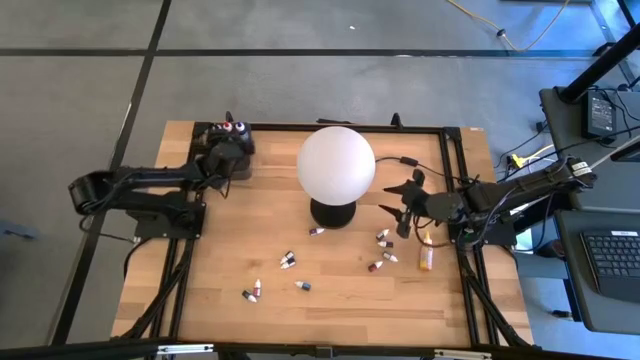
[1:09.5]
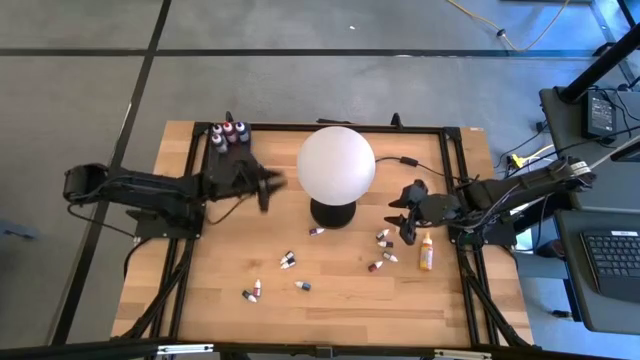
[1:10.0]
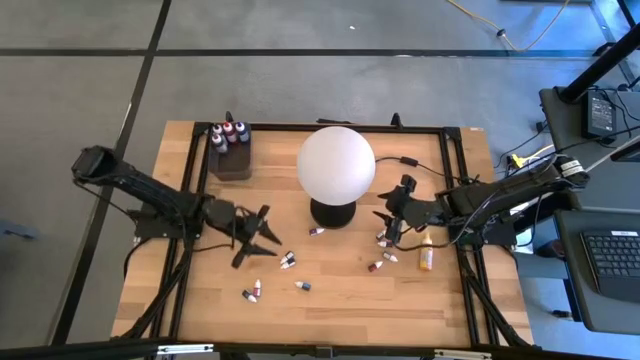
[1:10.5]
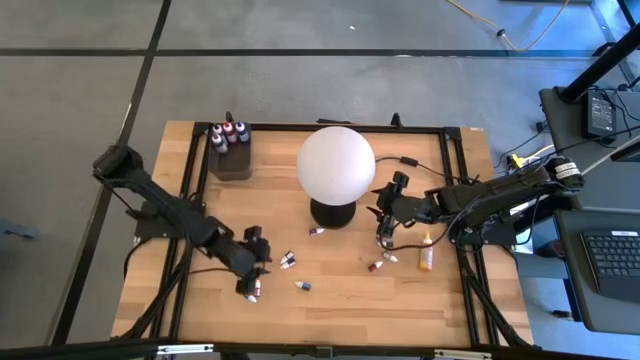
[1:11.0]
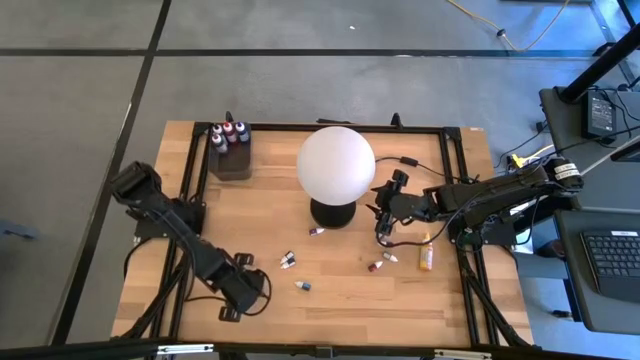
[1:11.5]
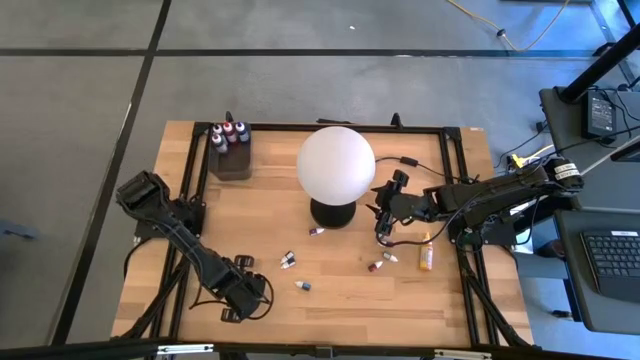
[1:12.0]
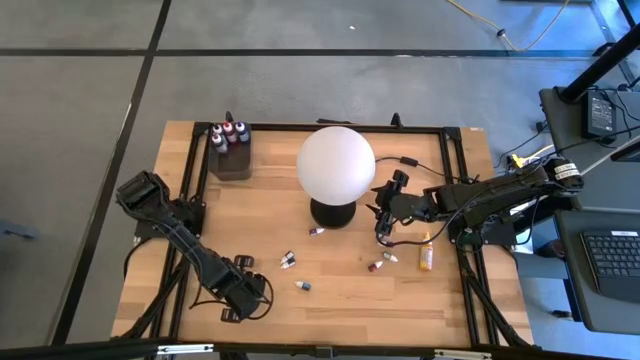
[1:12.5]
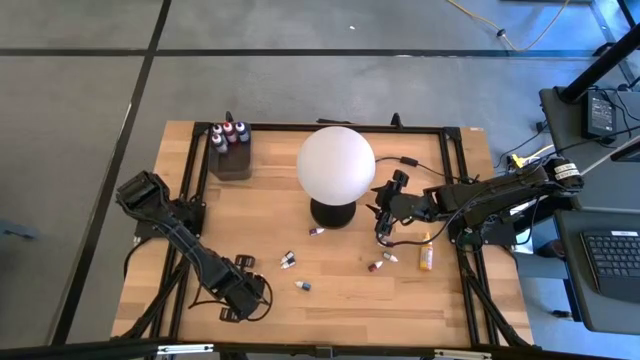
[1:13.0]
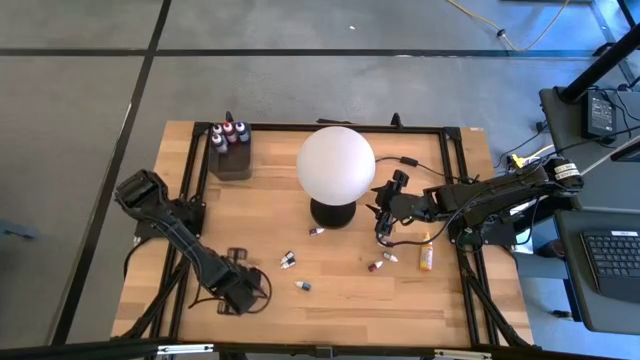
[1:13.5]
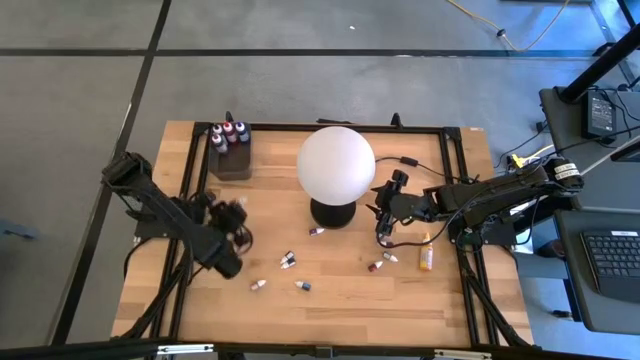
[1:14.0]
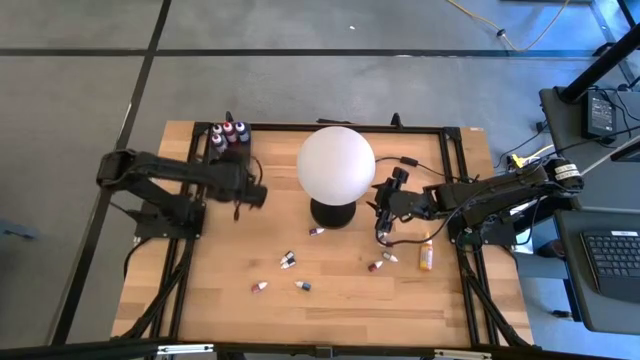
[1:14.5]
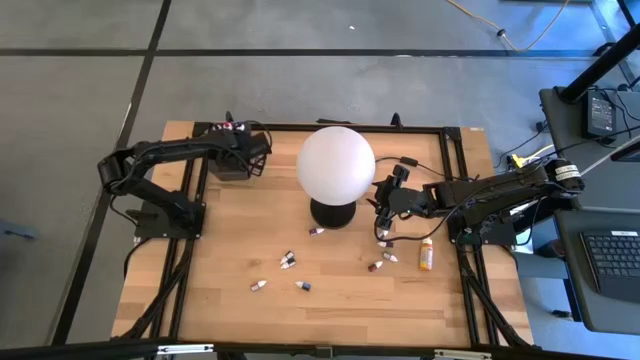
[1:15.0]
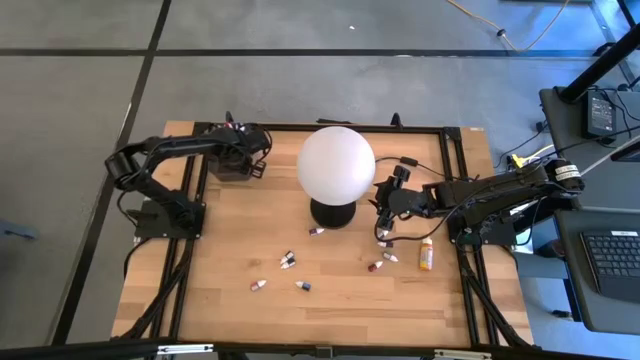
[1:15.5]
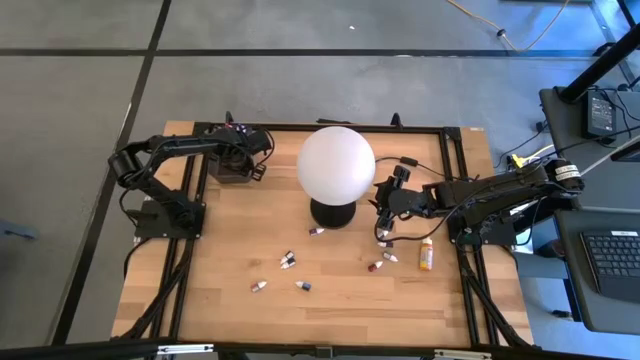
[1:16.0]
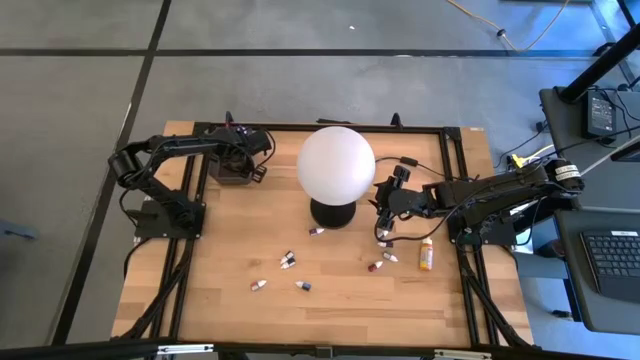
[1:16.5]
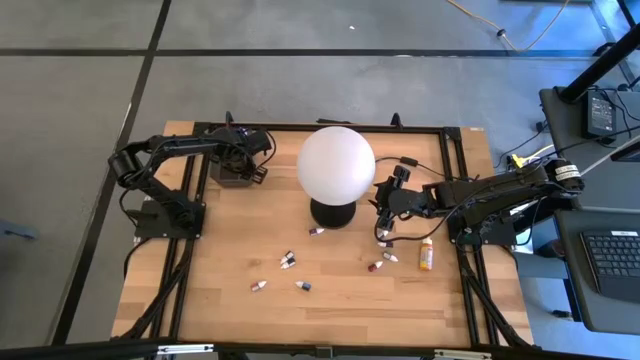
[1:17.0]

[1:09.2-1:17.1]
Task: Pick & Place food coloring
Put the left small blue food coloring bottle into the black container

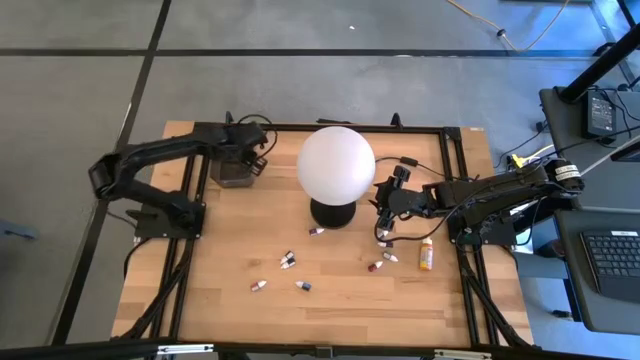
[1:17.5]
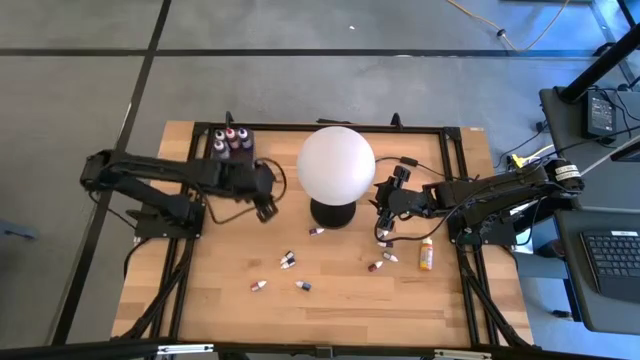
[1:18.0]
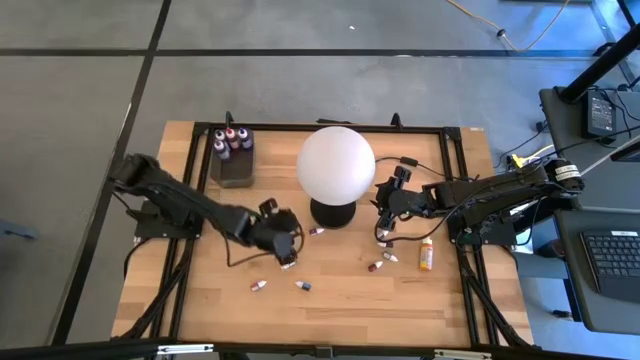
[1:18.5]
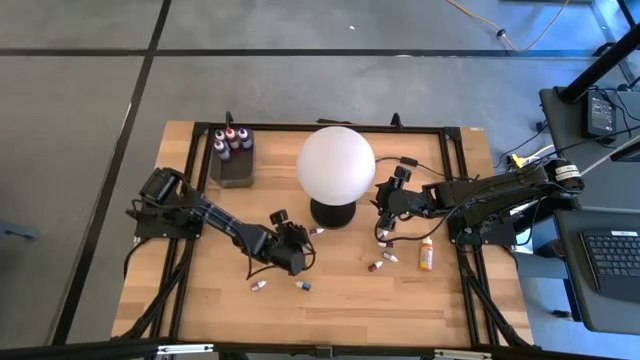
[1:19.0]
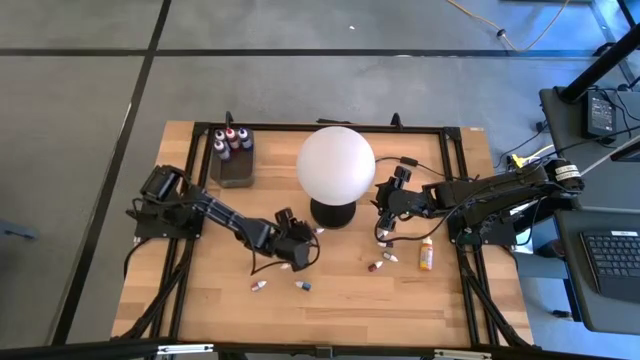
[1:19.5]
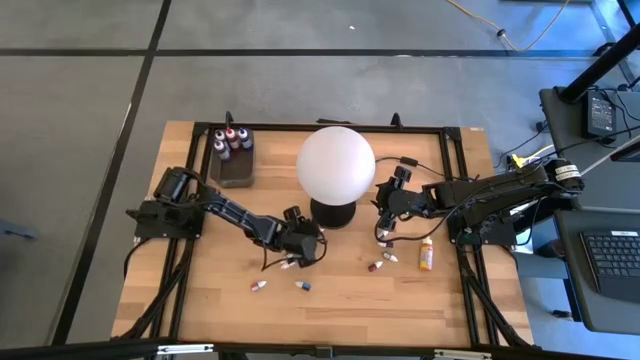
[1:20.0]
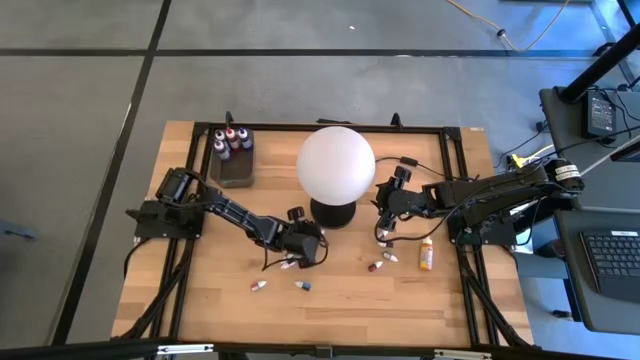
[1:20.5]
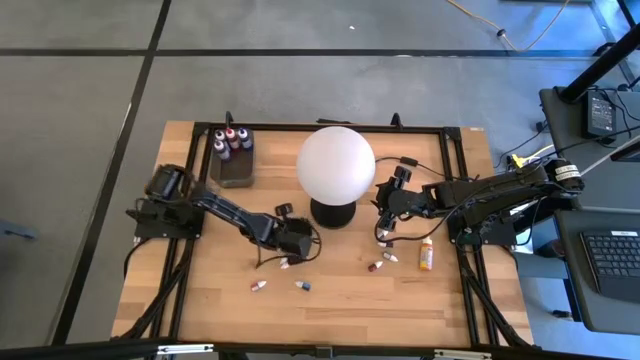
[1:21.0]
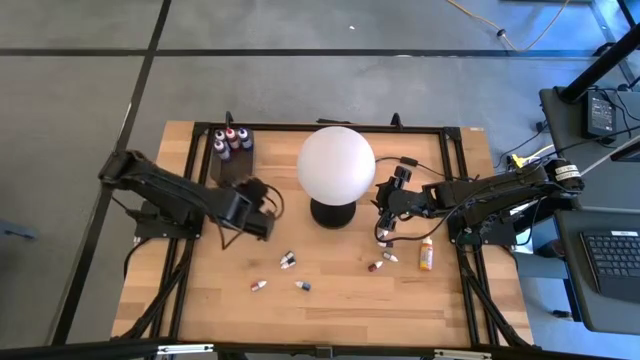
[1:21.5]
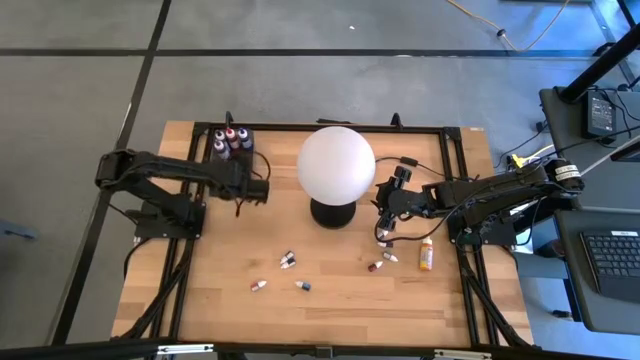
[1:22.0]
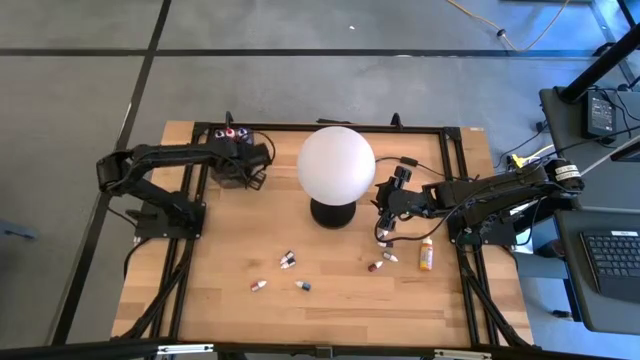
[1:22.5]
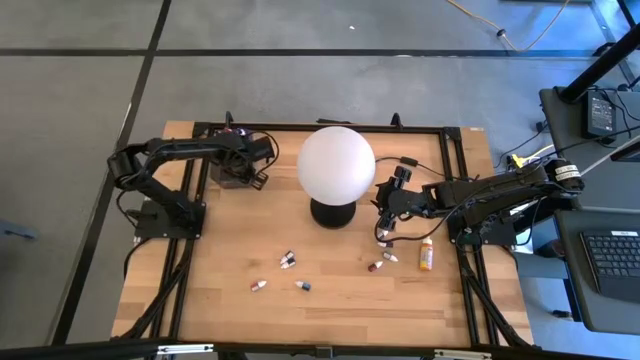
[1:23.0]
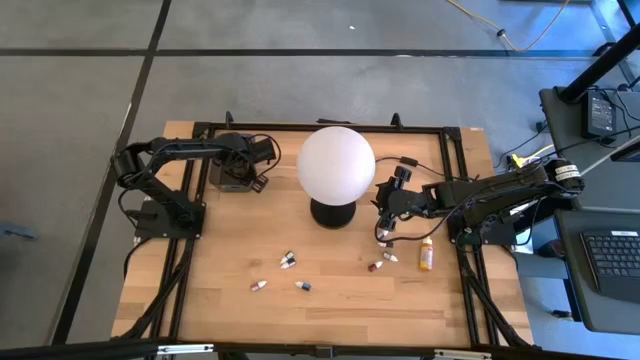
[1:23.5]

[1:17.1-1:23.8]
Put the small purple food coloring bottle into the black container

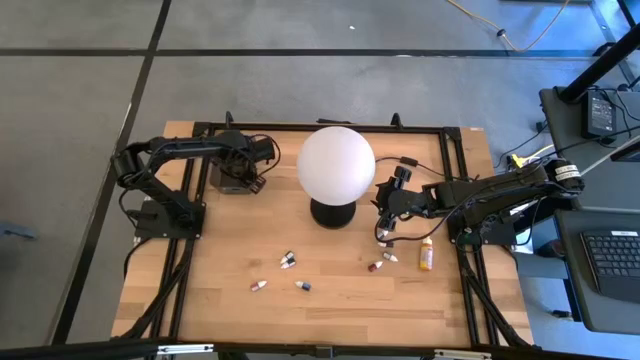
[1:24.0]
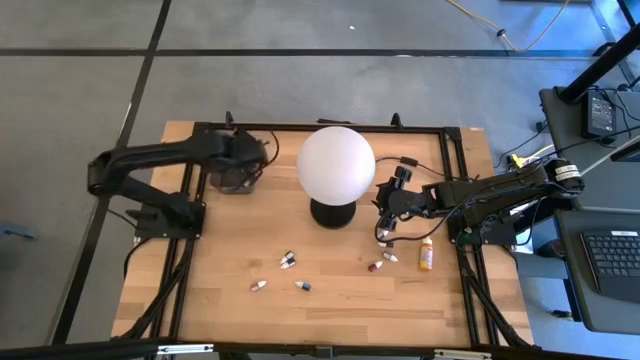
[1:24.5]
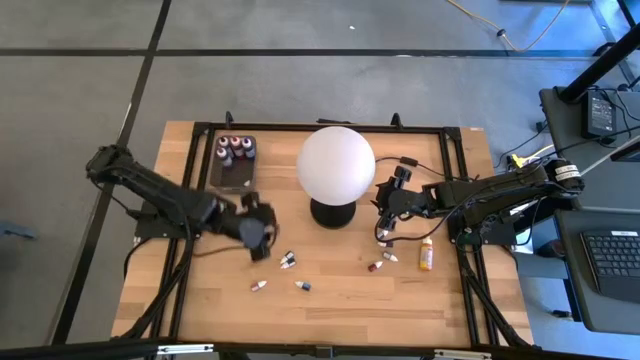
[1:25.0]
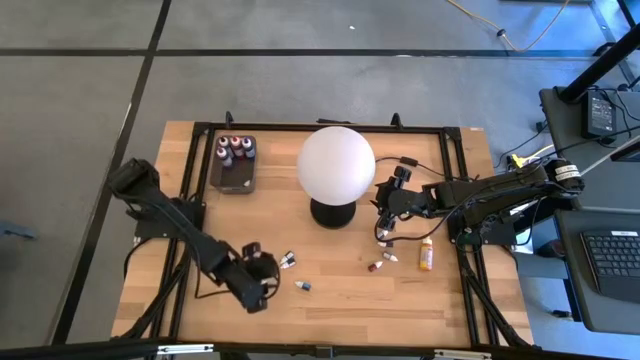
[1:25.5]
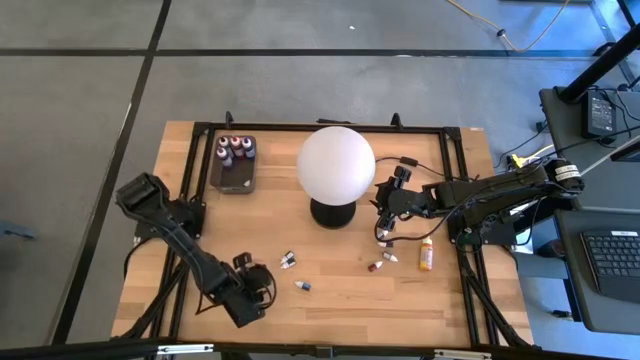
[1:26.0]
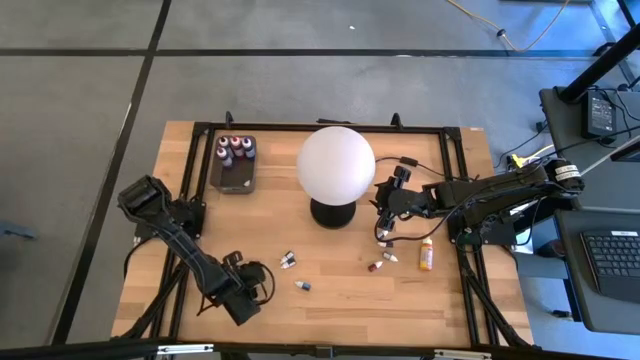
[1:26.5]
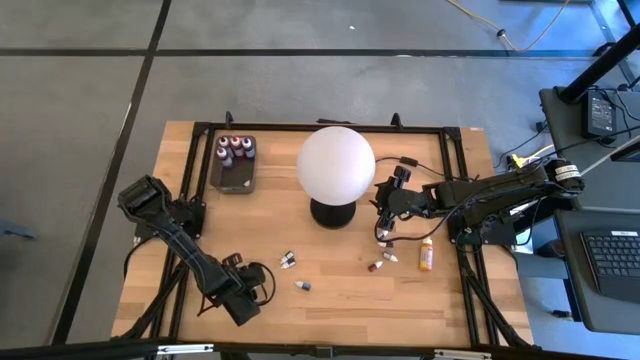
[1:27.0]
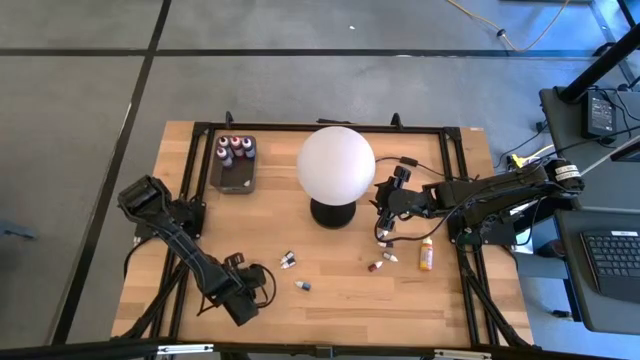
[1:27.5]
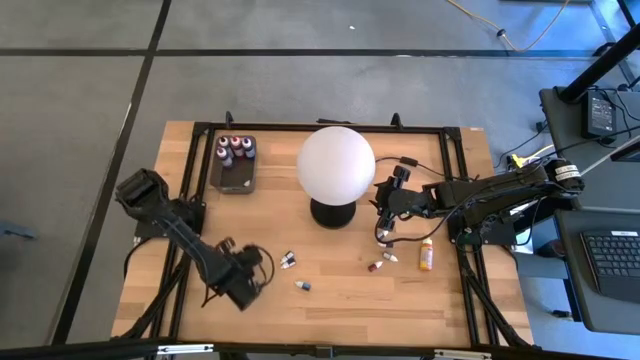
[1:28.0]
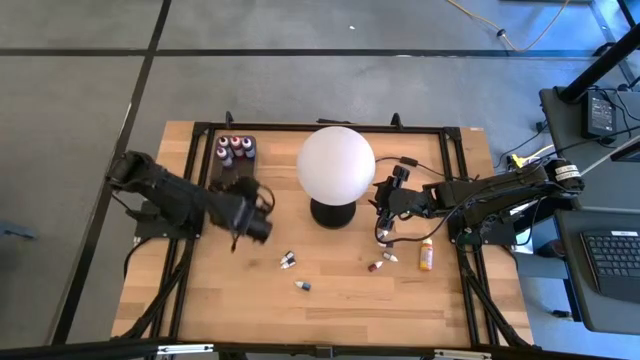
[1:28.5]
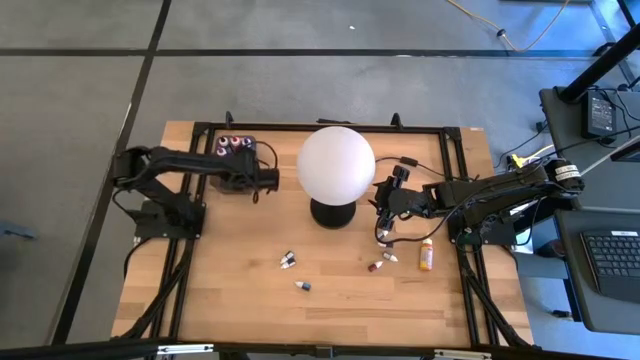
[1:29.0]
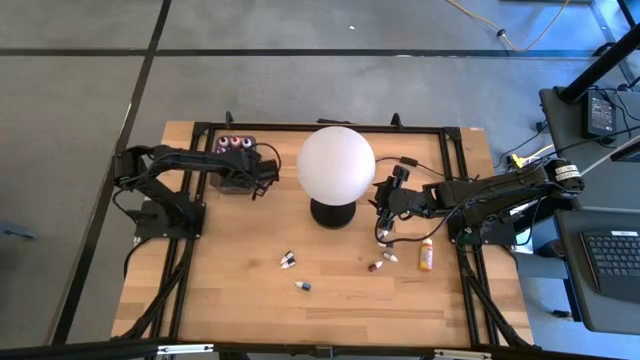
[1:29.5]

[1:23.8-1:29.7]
Put the left small pink food coloring bottle into the black container

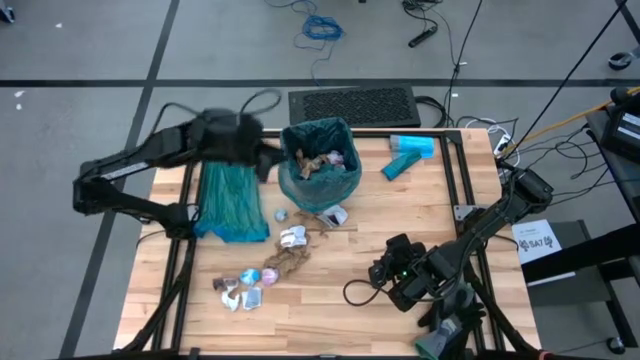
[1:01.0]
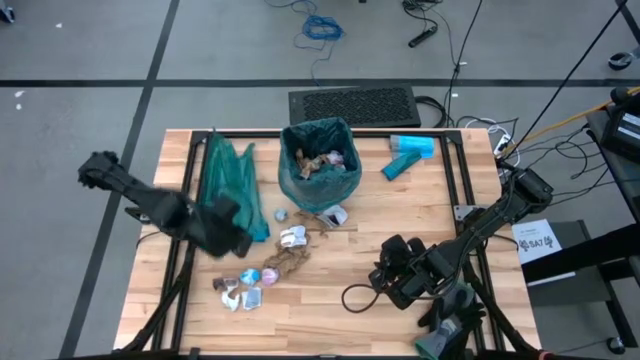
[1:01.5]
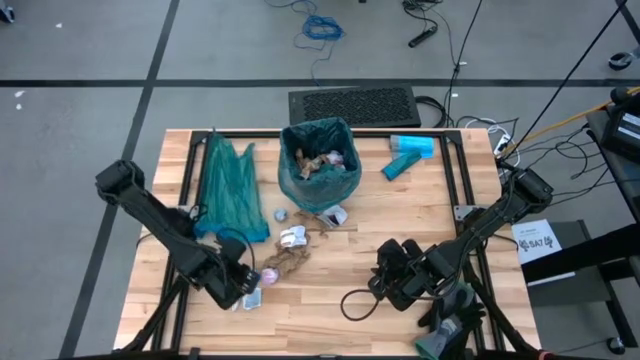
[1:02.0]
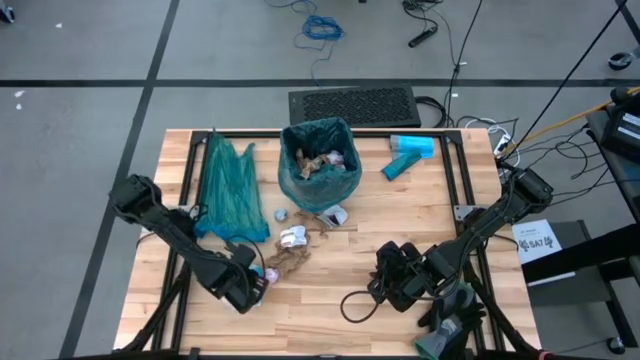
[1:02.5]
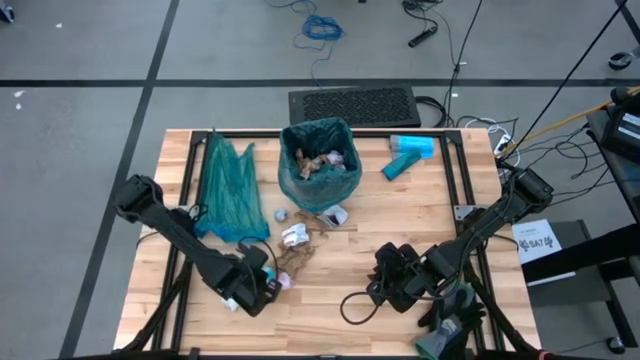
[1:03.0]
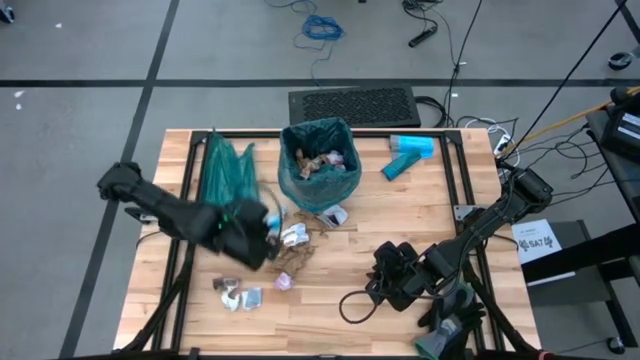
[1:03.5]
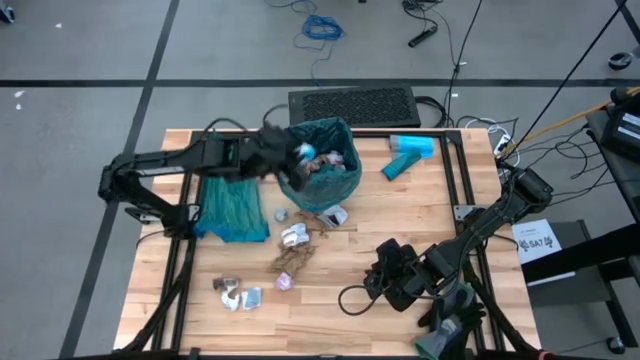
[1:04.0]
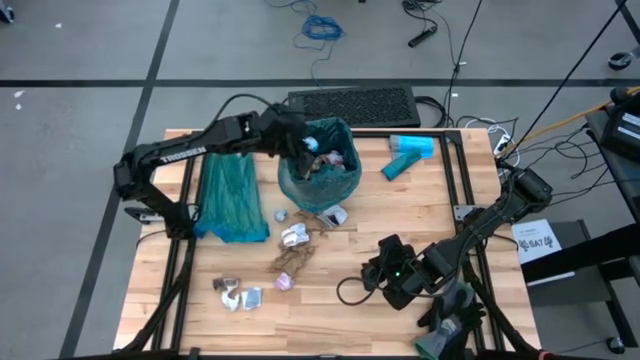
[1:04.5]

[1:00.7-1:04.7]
Task: place trash/remove bag and relplace
Put the blue plastic into the blue trash bag inside the black trash bin
